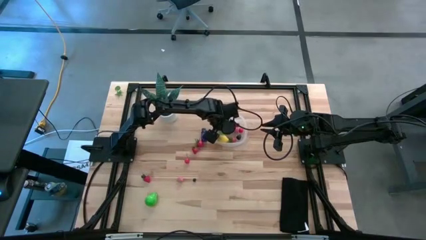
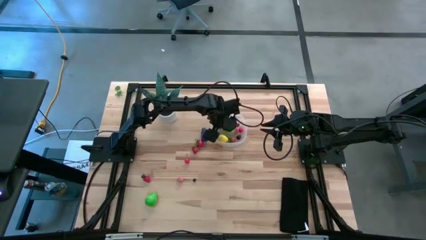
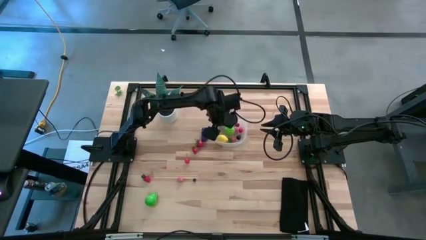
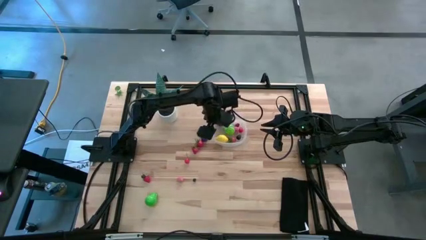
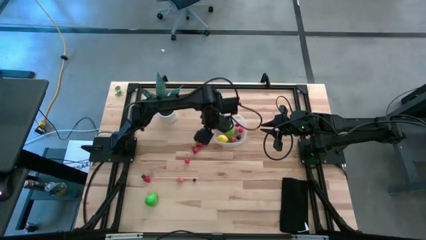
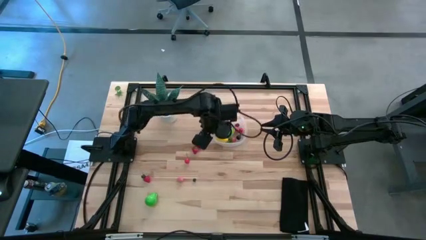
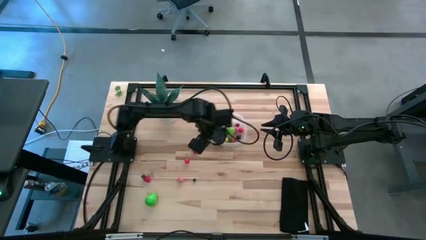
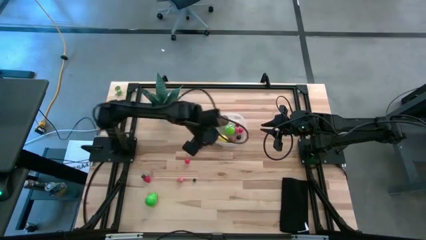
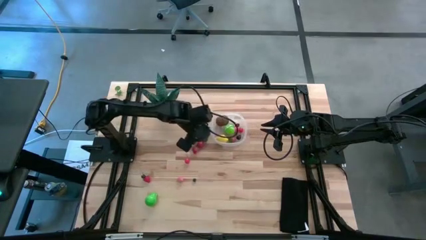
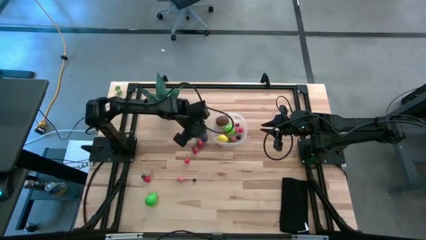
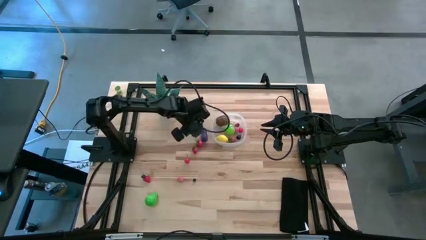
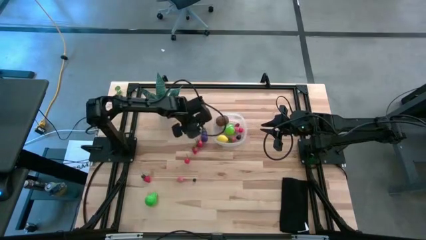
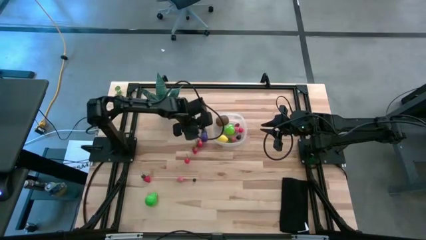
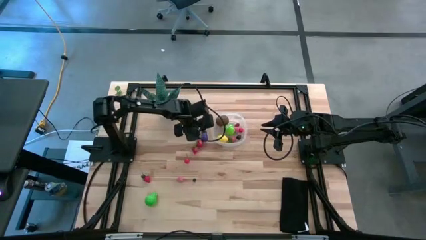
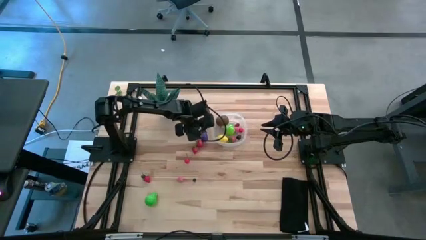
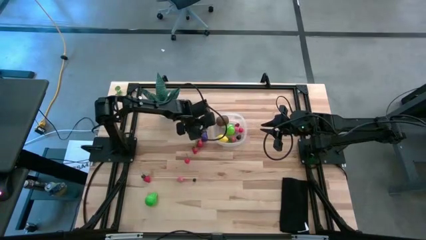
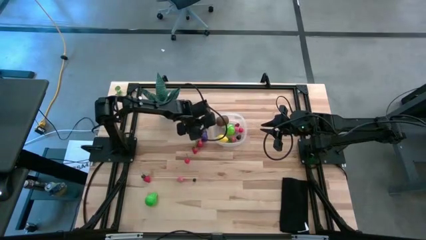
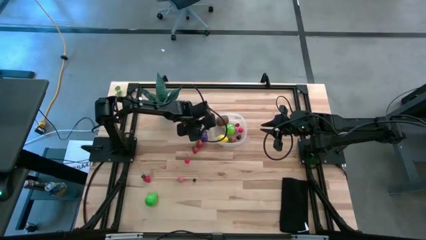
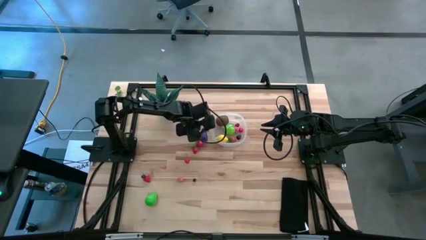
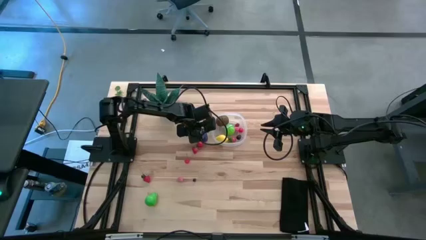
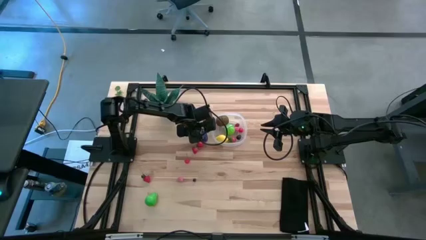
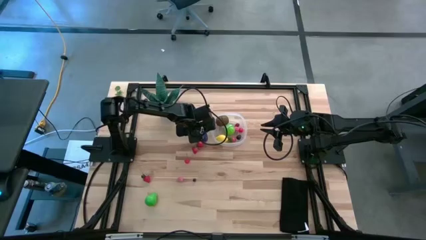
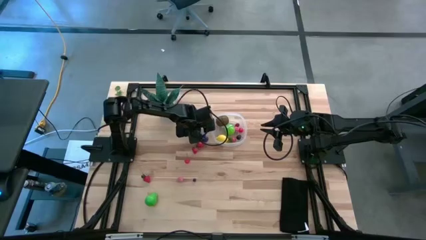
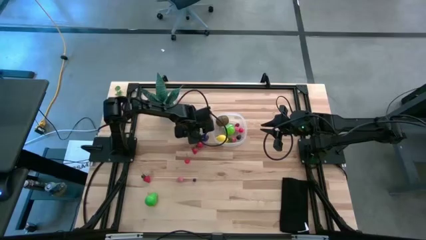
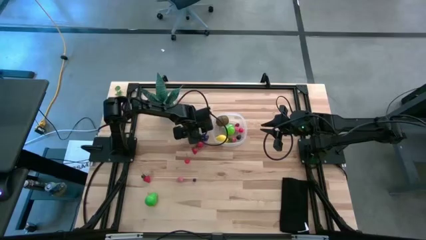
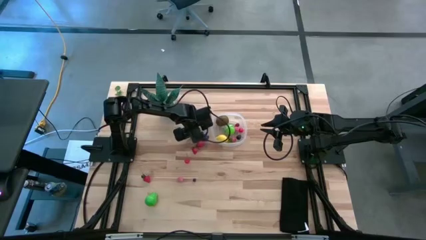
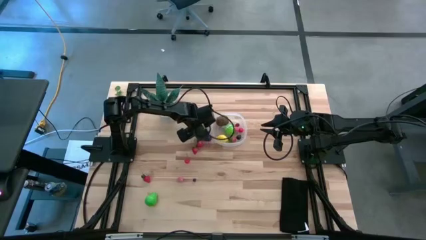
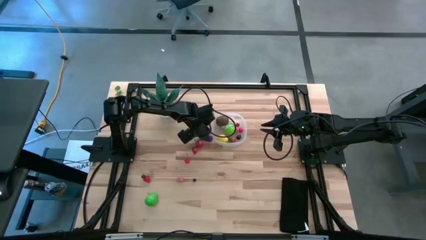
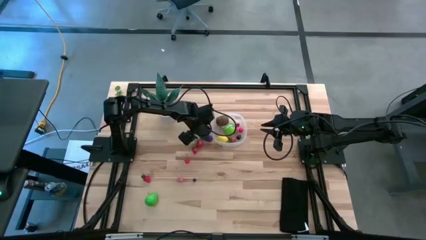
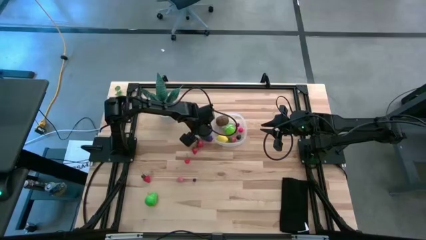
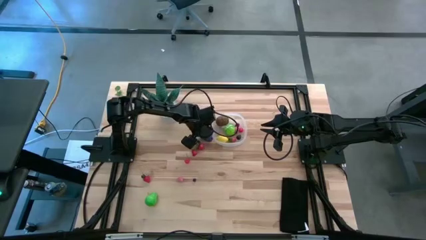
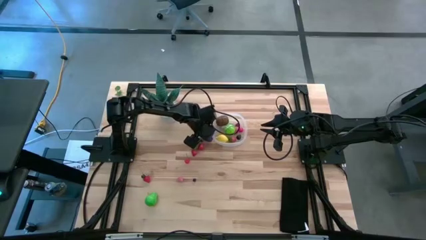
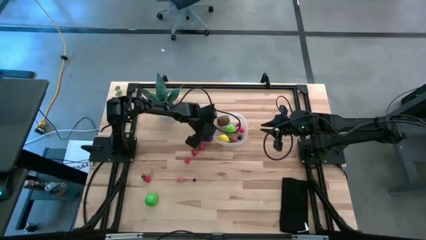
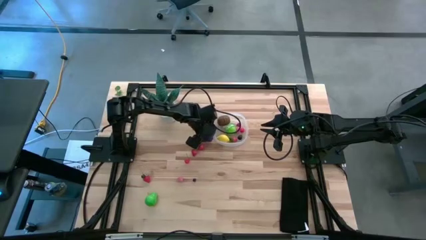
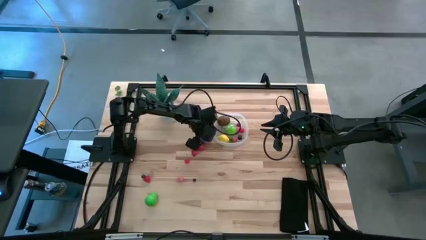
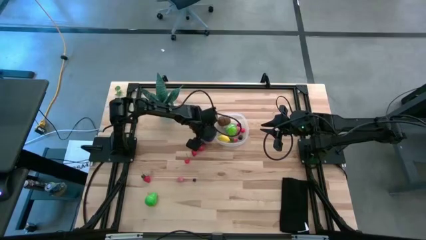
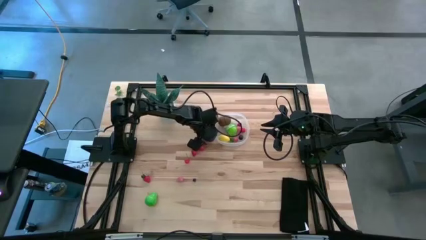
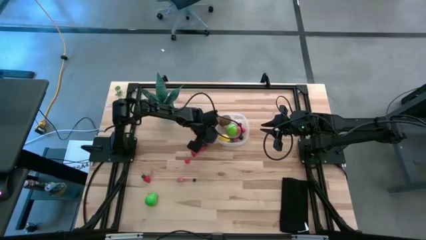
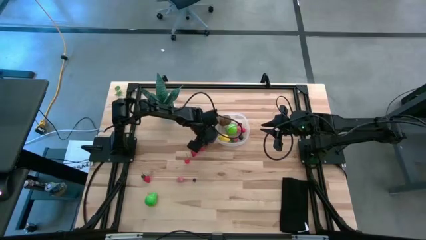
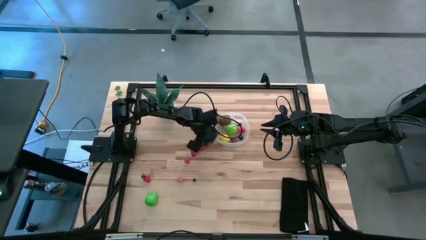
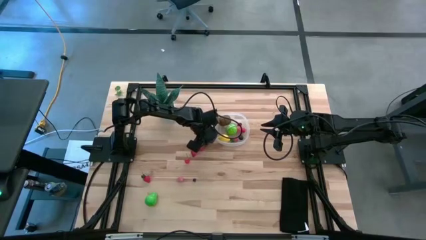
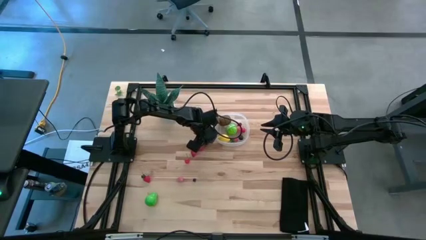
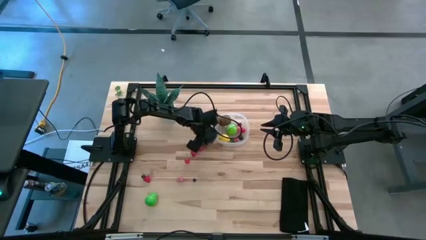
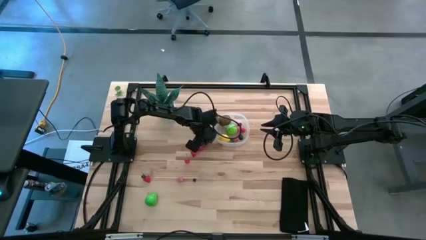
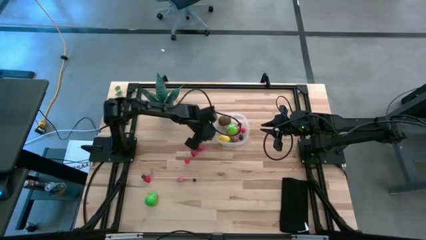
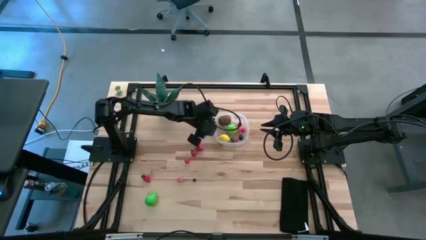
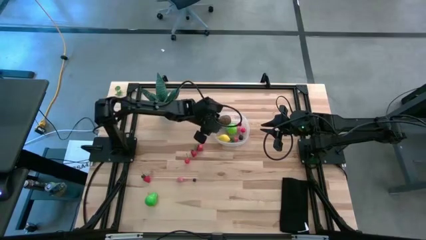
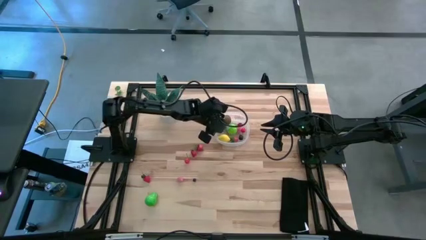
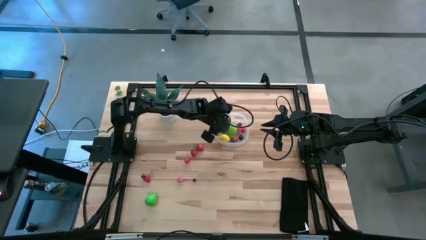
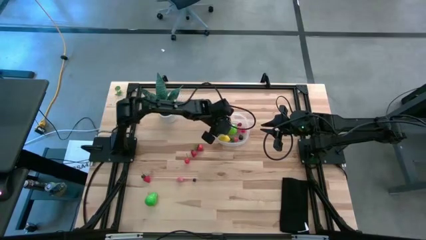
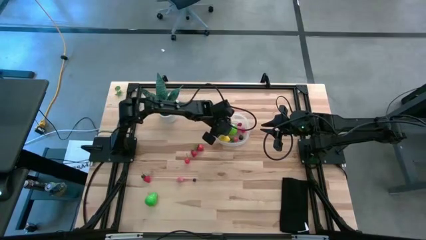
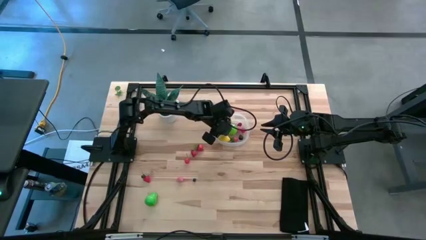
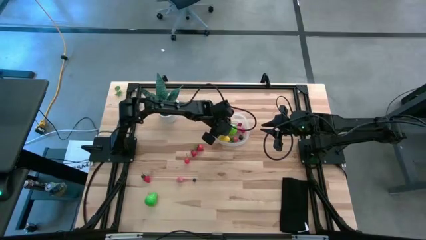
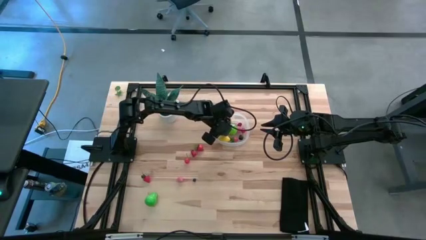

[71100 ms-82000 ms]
Task: Pick and placing Produce into tupperware
Put the eggplant into the transparent bin

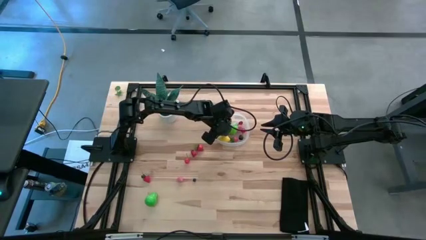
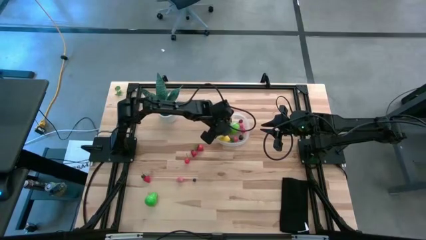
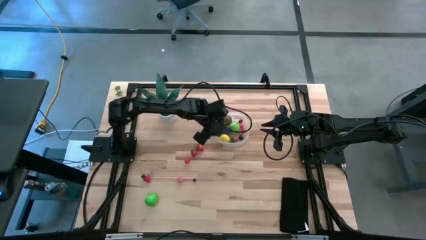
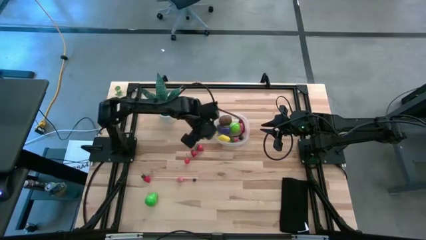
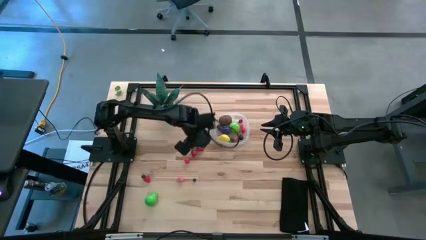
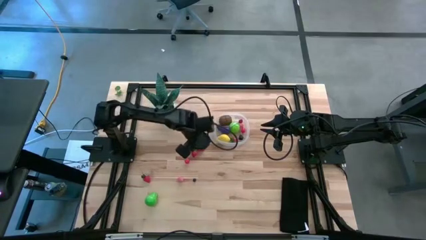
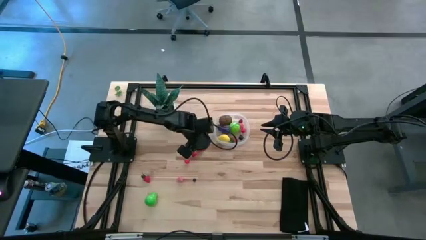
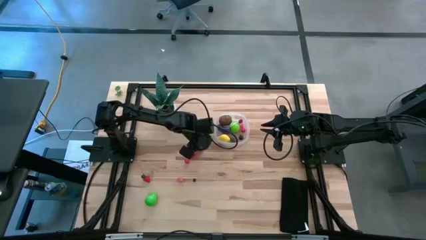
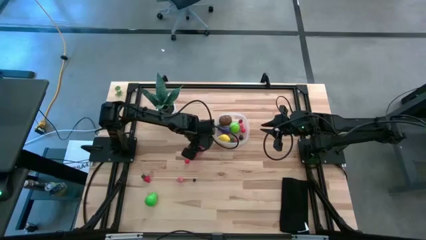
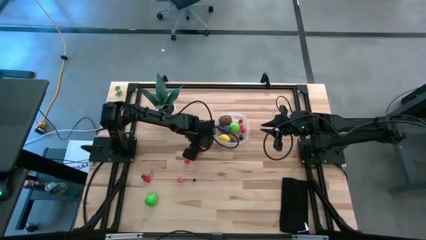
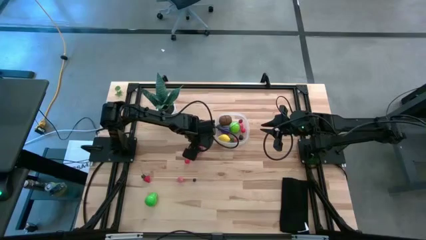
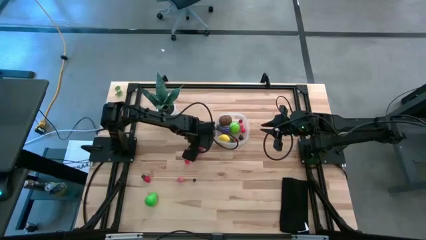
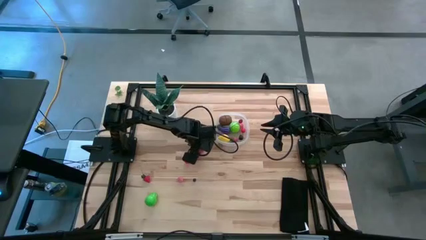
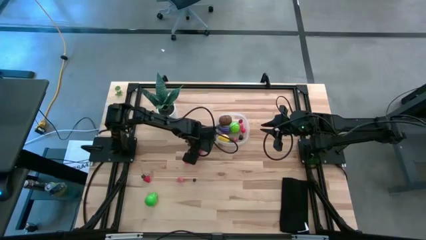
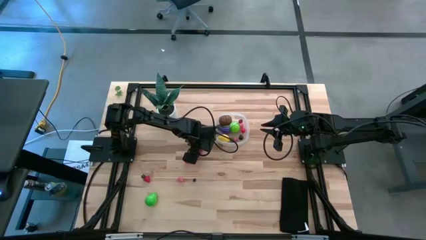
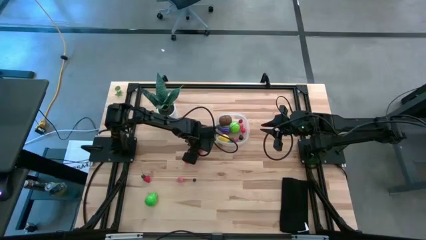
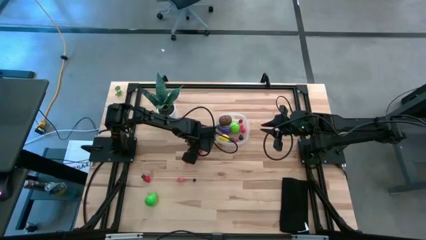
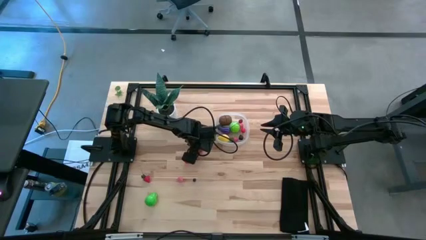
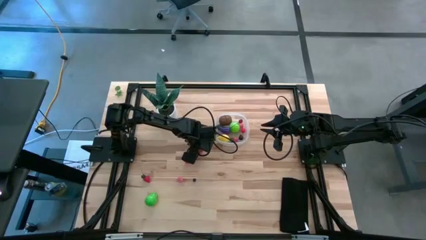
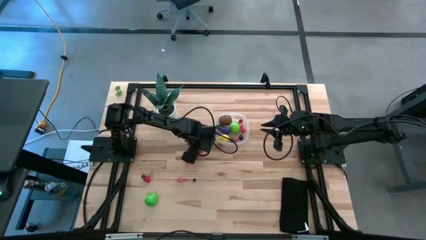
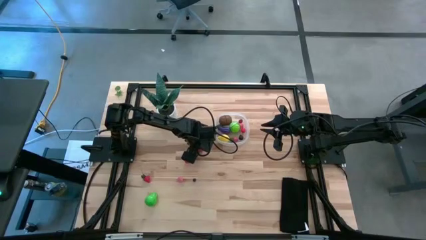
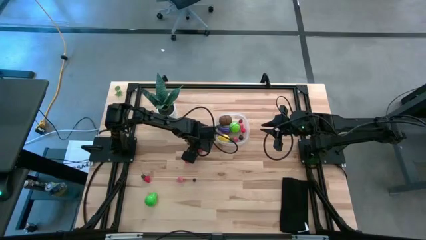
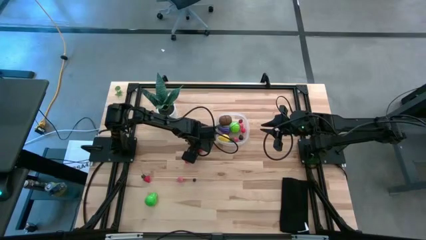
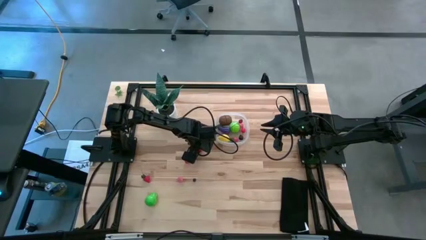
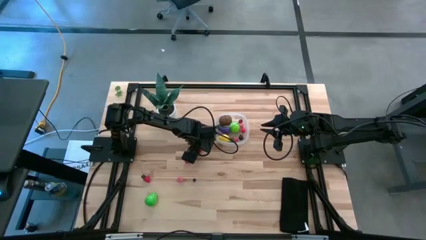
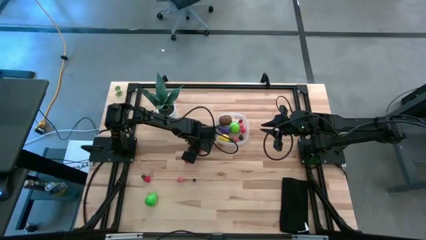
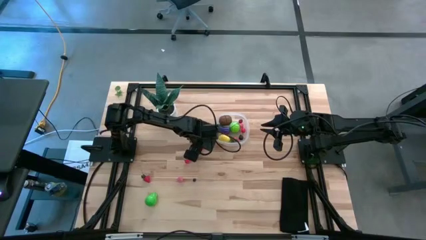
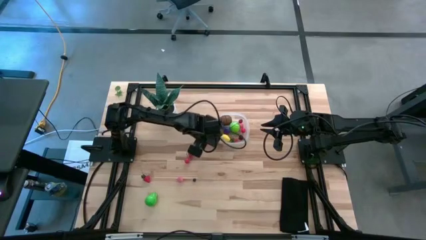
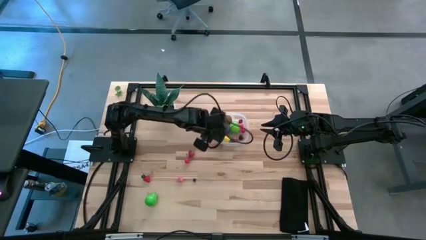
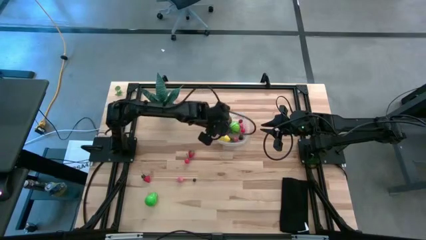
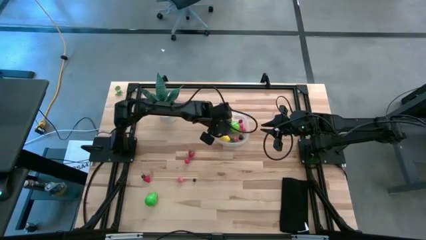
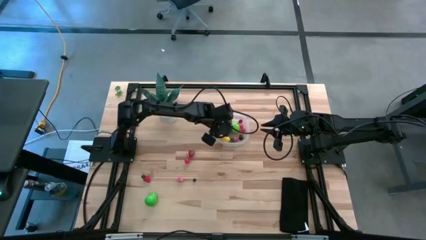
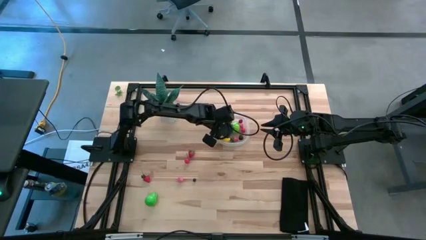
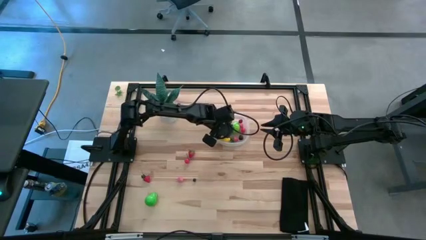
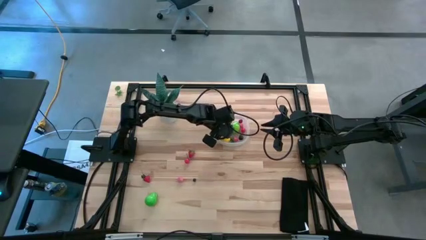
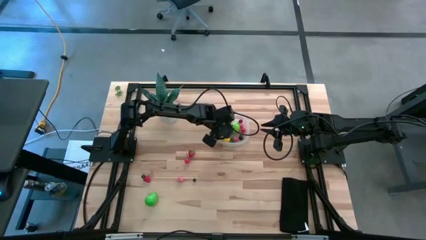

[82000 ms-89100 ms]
Put the top right strawberry into the transparent bin
